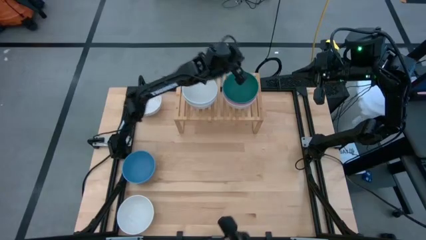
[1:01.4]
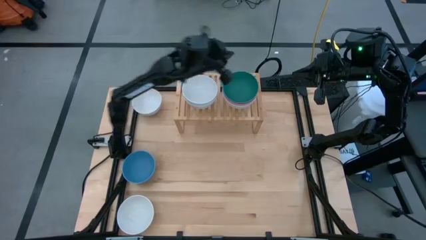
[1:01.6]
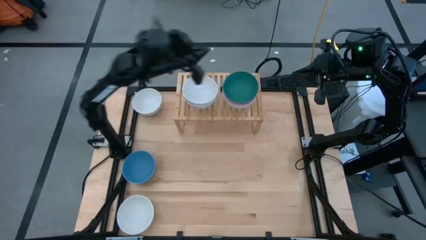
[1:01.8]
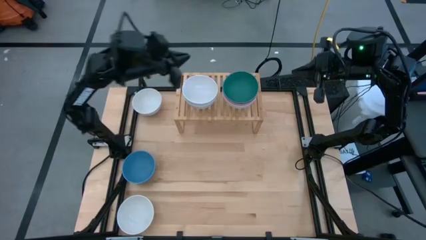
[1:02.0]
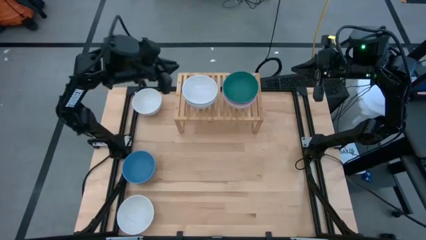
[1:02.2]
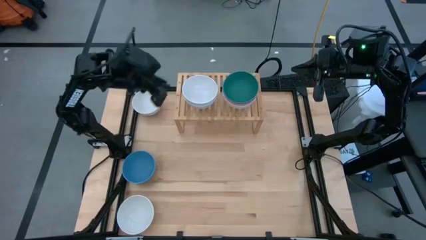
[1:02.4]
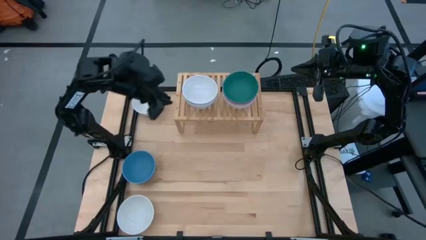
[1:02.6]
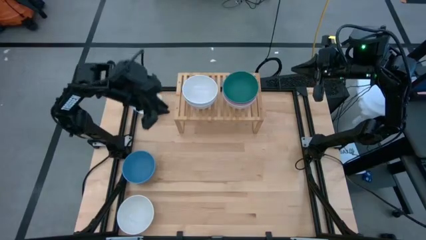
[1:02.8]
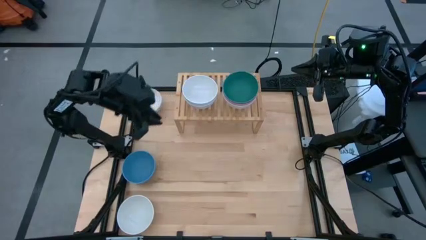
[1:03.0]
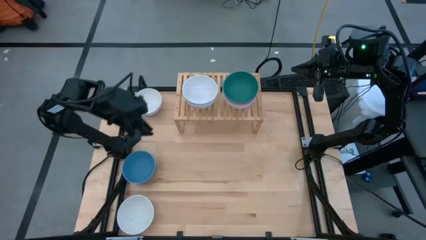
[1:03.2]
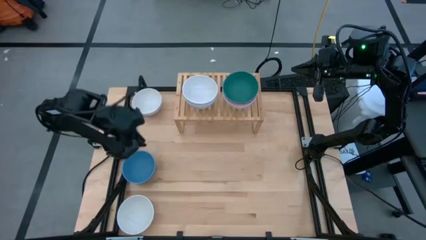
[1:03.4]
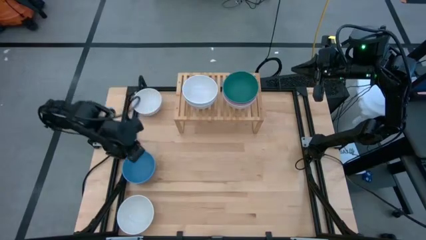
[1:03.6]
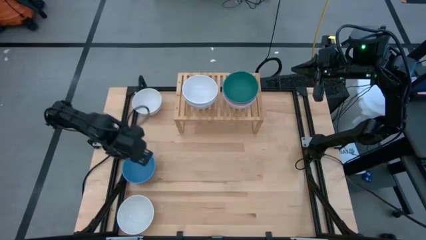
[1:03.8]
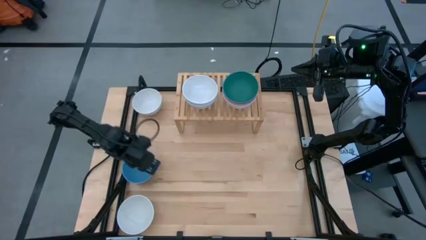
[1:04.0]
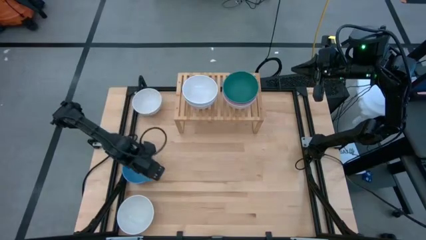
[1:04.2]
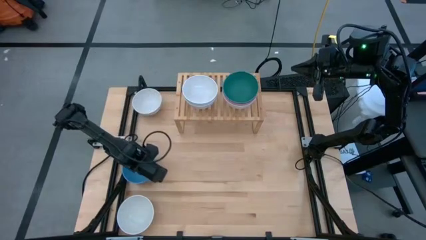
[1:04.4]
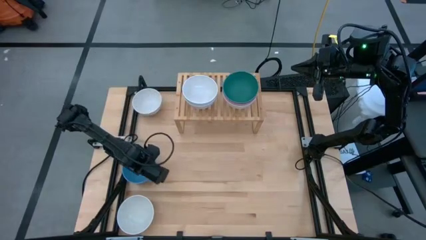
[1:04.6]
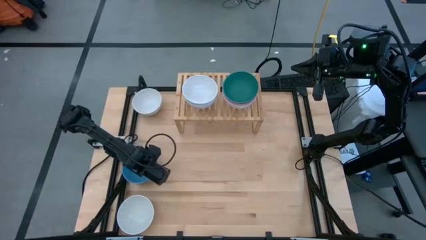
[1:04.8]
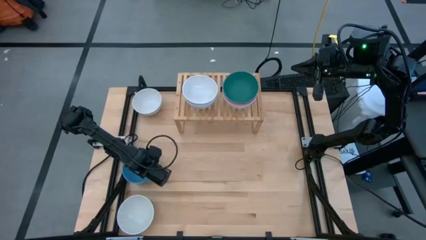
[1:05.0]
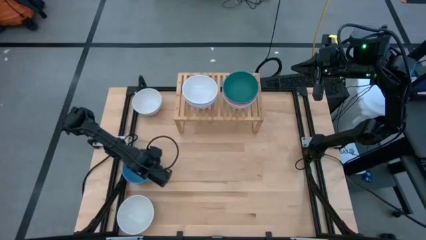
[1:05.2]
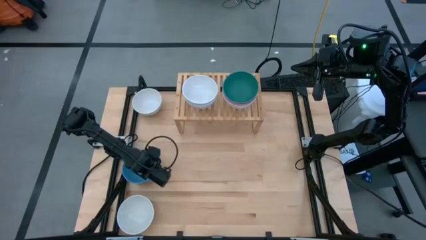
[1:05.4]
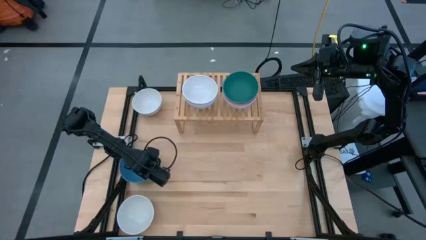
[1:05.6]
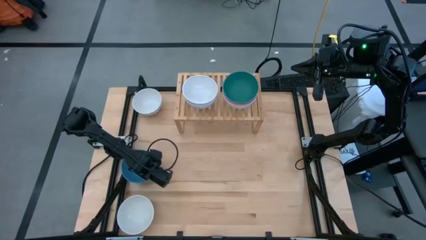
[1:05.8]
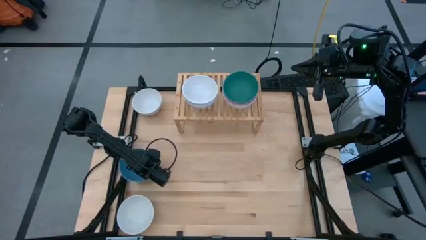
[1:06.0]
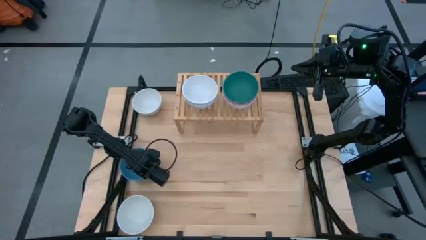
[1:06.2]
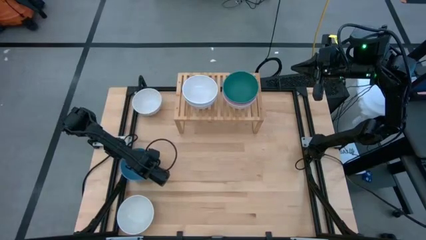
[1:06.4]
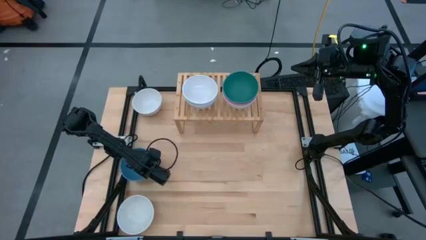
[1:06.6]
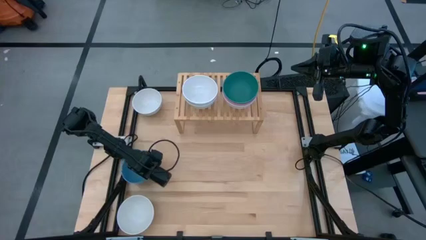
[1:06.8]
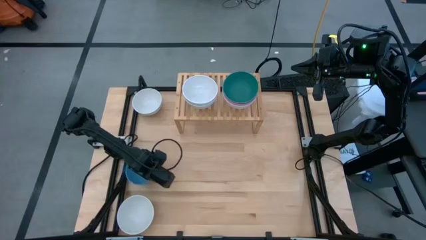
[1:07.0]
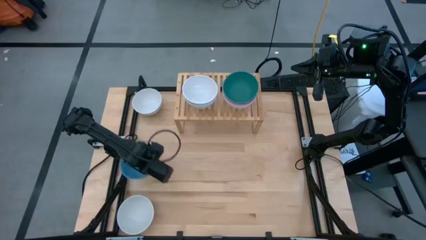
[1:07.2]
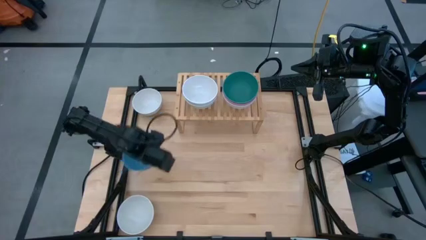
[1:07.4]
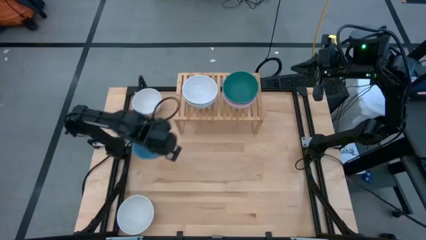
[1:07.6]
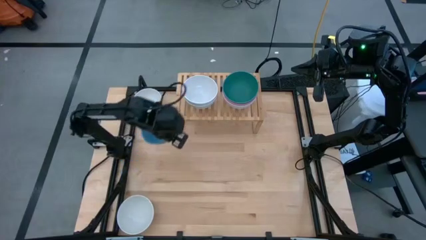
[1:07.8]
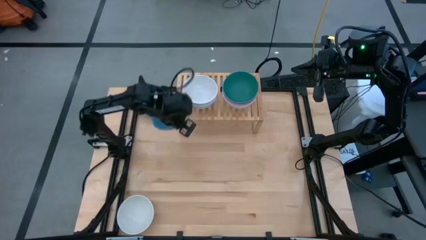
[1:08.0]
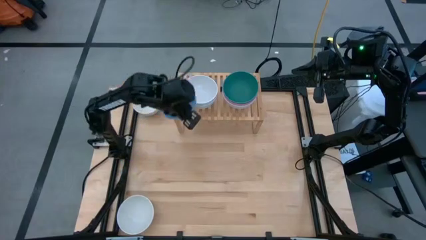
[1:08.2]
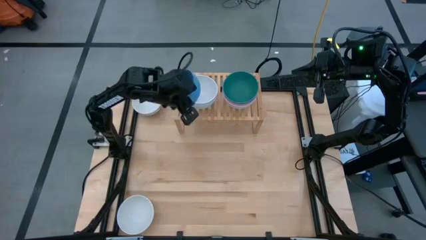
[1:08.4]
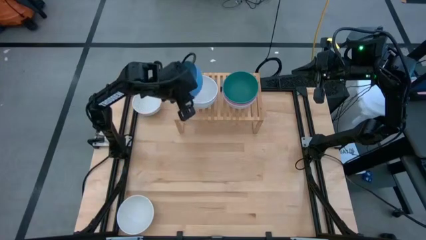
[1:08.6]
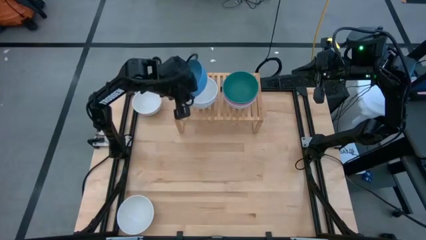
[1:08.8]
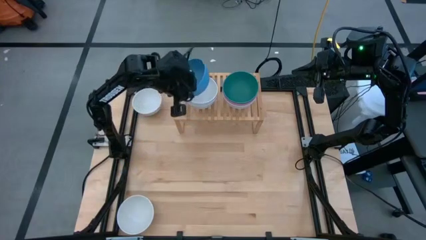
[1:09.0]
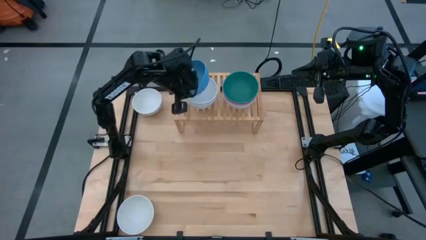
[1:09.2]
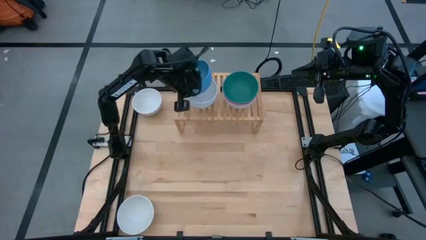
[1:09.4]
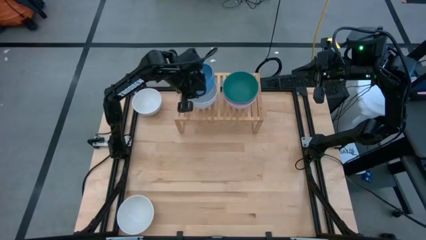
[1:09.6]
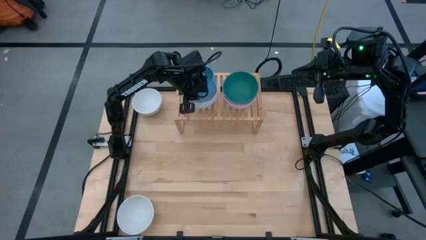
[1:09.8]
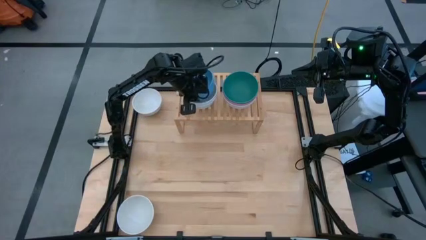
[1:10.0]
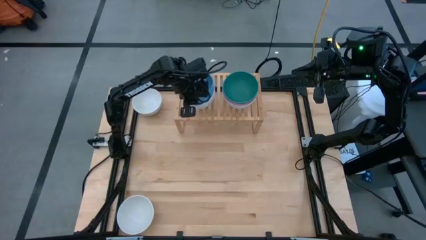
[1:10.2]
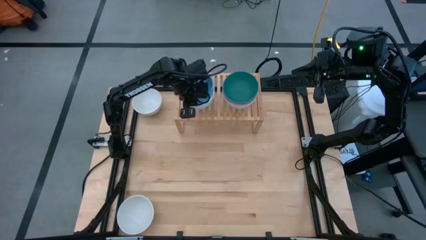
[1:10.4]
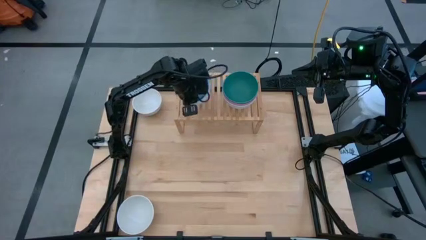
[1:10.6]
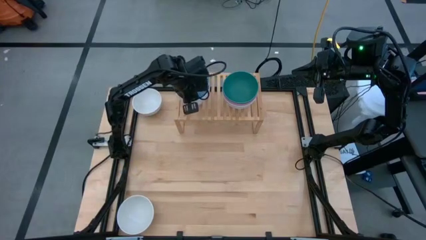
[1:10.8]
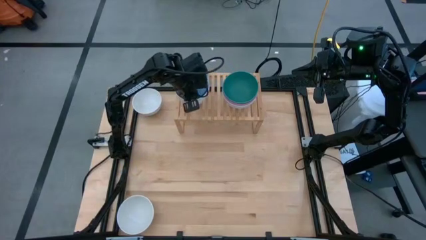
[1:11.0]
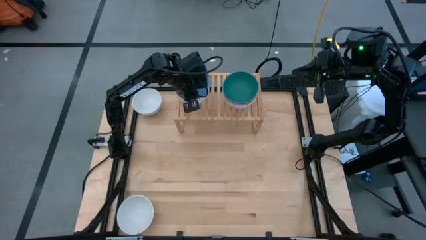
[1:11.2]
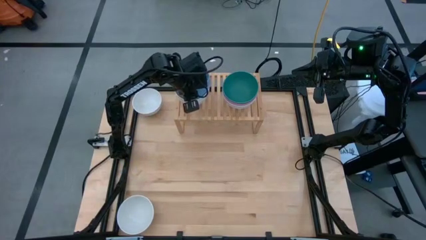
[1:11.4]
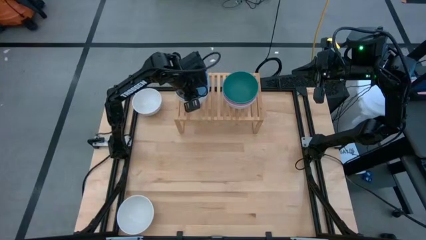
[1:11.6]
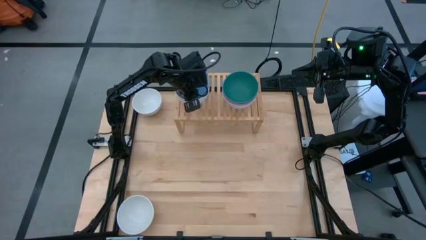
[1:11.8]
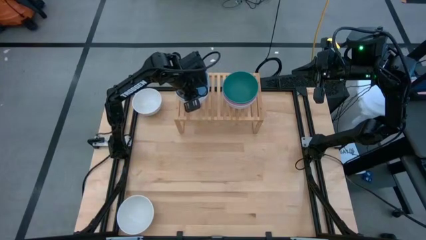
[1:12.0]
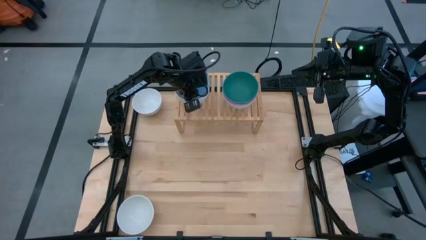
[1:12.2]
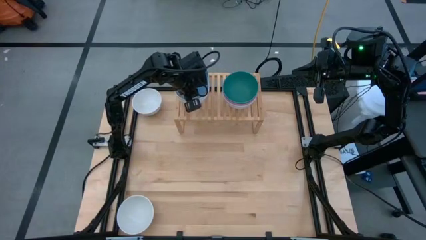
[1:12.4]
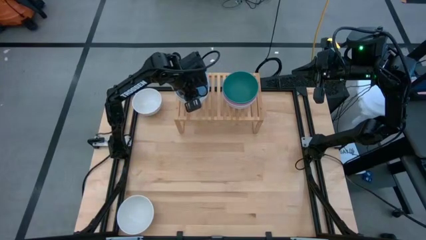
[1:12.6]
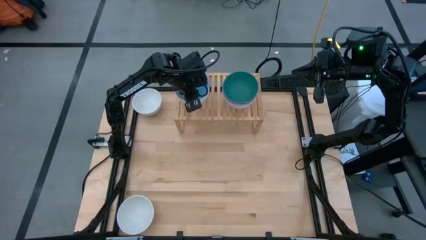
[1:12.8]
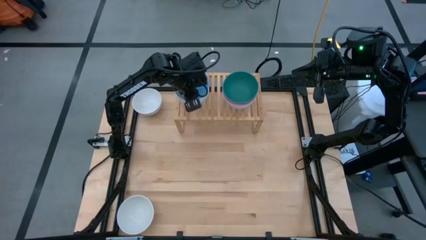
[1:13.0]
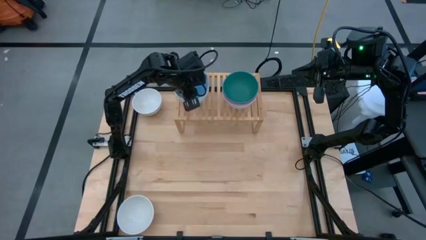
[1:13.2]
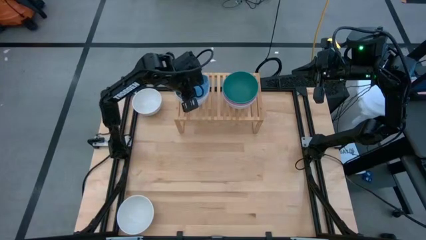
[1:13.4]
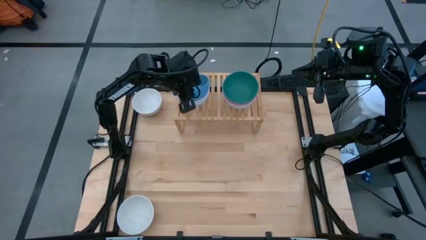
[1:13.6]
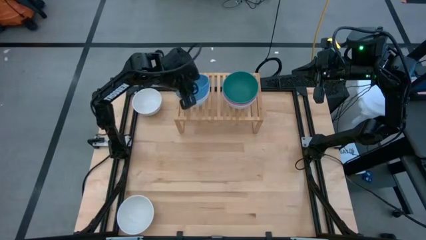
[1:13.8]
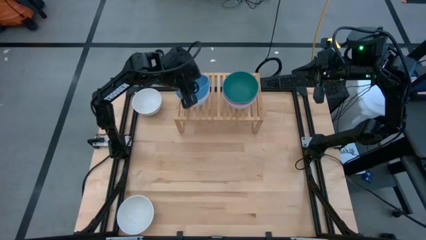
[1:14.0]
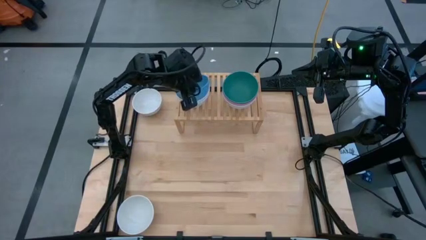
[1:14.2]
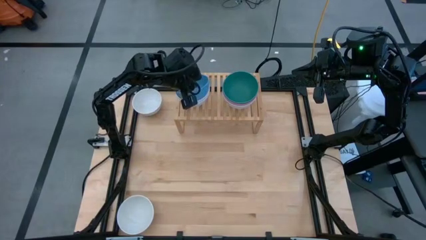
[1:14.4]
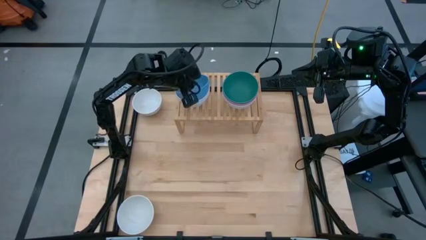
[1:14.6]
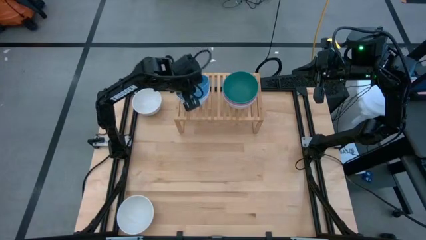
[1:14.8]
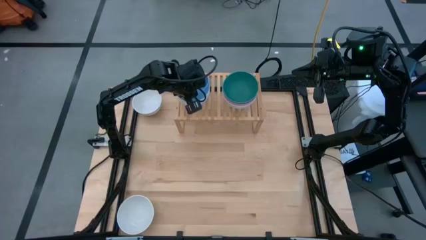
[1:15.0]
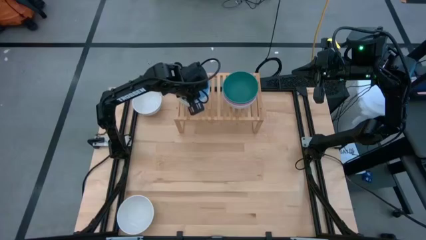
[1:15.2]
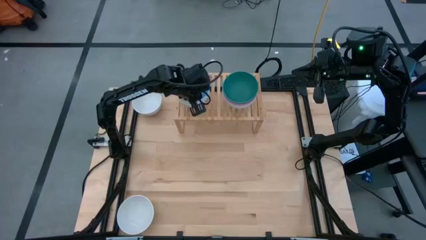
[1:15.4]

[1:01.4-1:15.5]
Task: Place and stack bowls onto a shelf
Stack the blue bowl on top of the white bowl on the shelf
